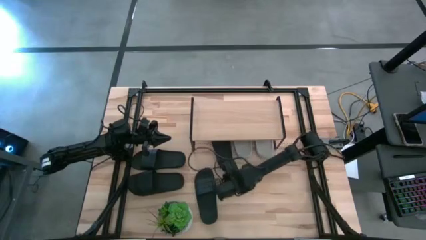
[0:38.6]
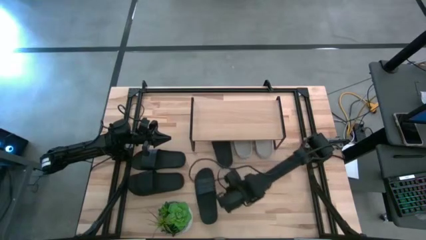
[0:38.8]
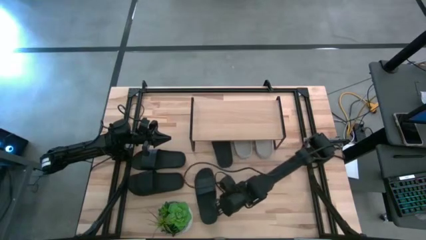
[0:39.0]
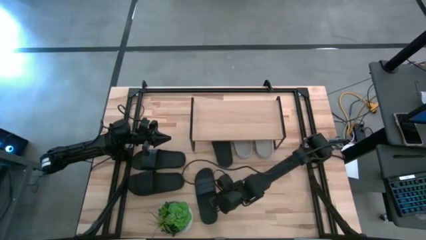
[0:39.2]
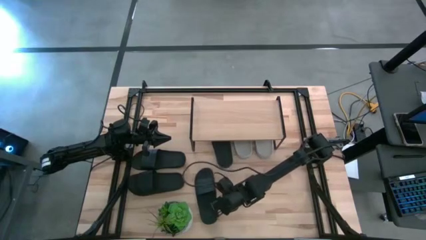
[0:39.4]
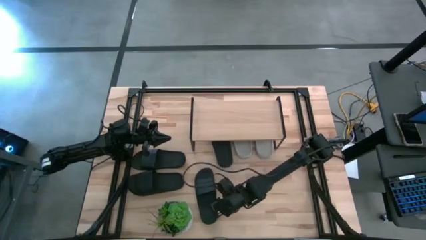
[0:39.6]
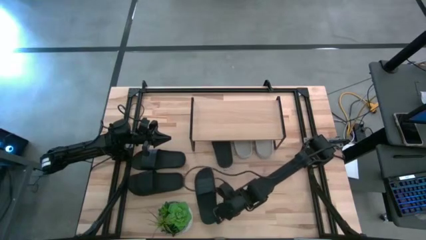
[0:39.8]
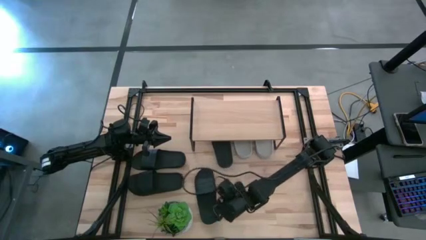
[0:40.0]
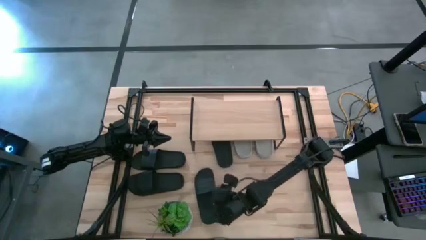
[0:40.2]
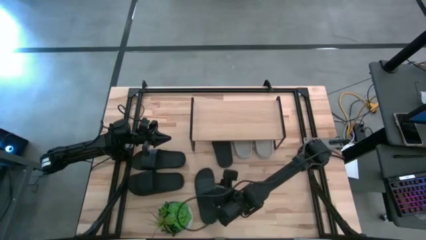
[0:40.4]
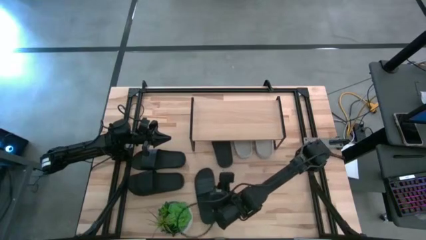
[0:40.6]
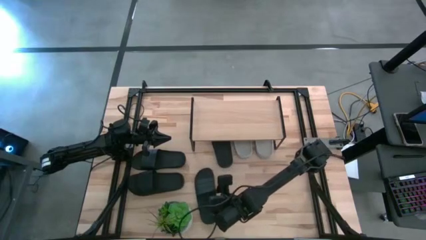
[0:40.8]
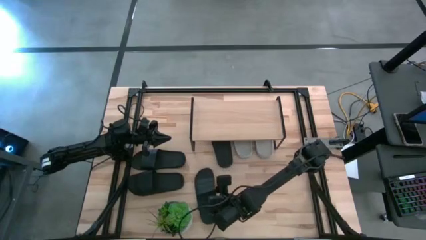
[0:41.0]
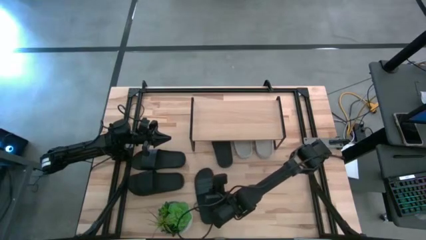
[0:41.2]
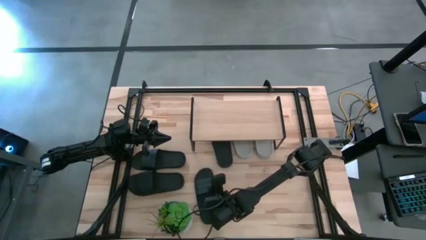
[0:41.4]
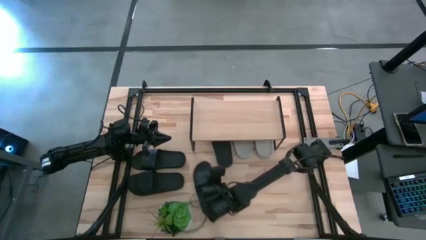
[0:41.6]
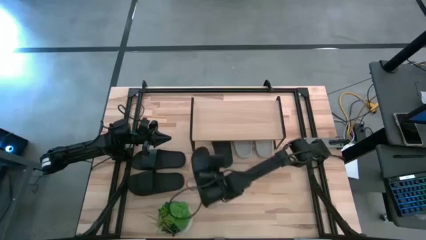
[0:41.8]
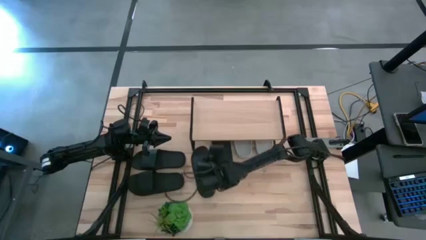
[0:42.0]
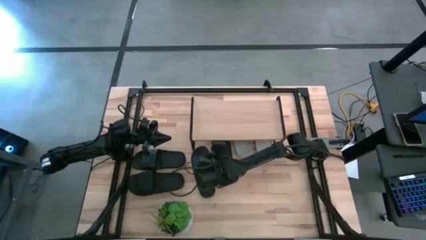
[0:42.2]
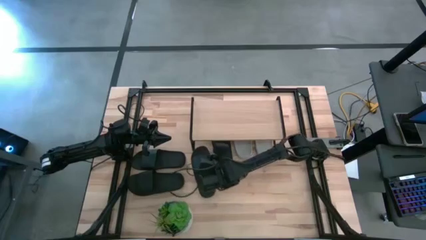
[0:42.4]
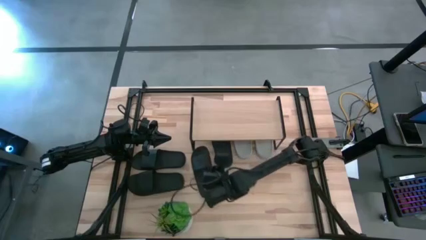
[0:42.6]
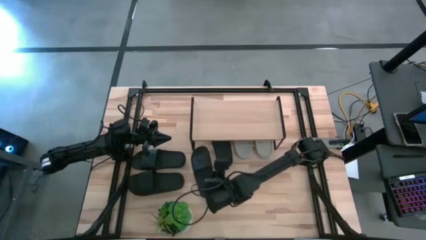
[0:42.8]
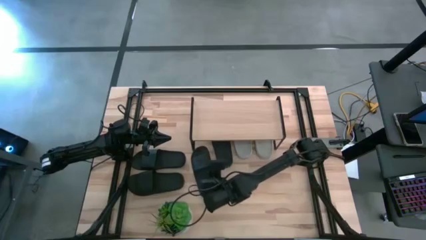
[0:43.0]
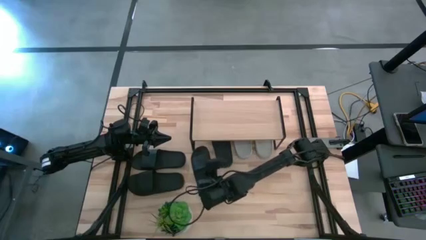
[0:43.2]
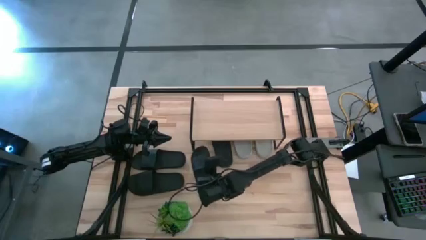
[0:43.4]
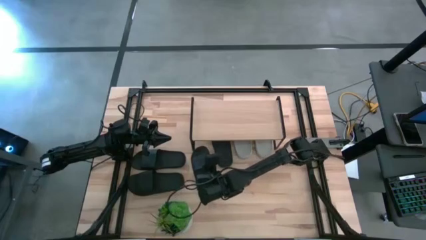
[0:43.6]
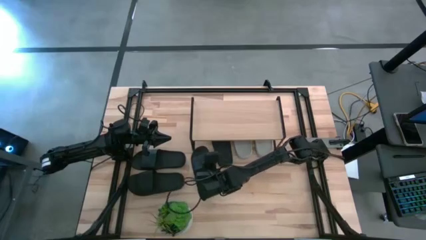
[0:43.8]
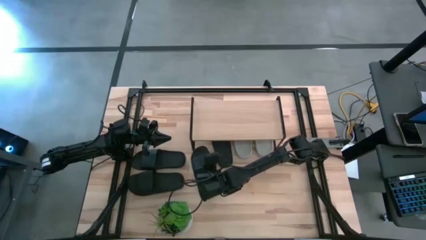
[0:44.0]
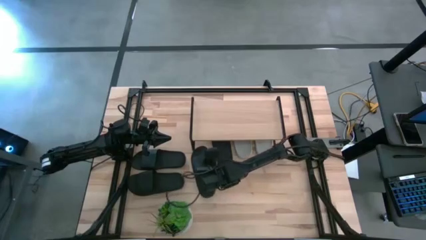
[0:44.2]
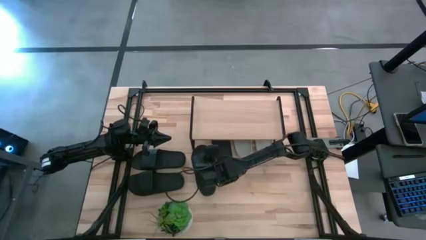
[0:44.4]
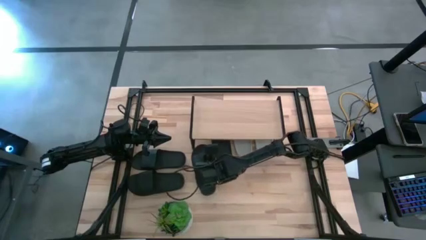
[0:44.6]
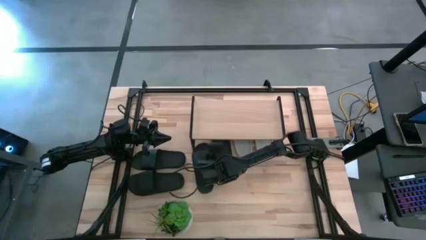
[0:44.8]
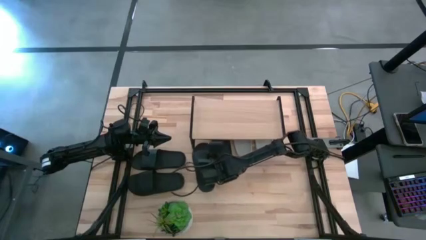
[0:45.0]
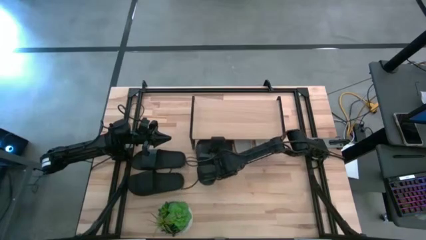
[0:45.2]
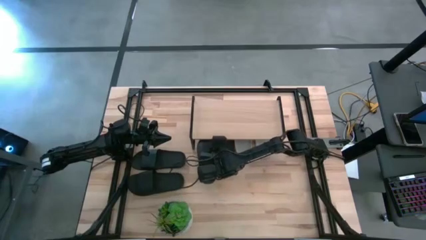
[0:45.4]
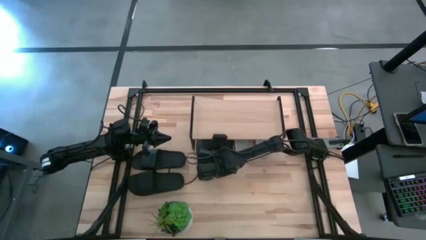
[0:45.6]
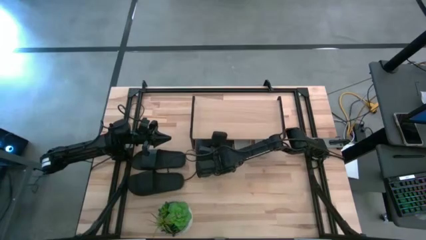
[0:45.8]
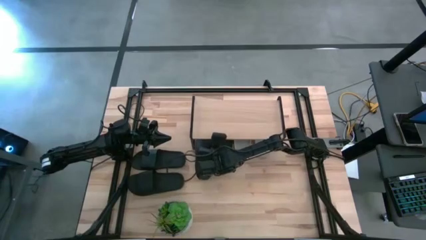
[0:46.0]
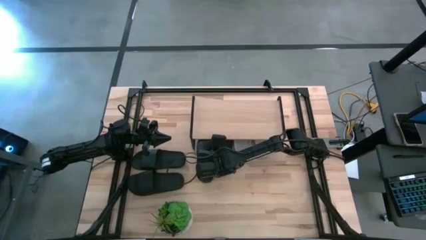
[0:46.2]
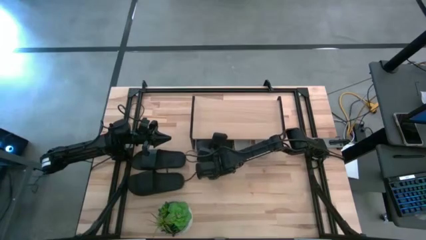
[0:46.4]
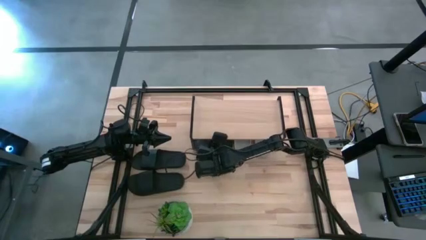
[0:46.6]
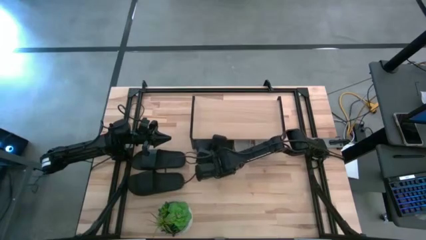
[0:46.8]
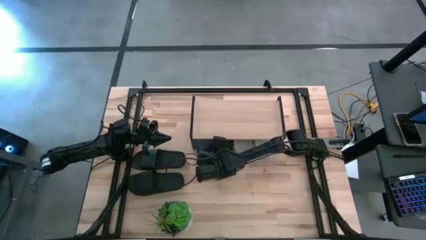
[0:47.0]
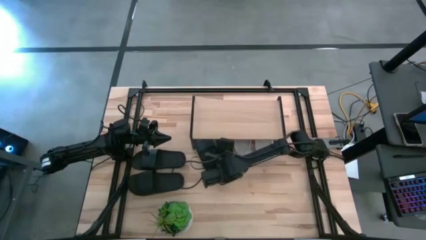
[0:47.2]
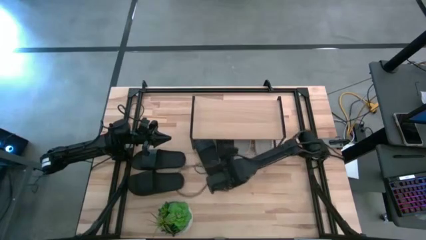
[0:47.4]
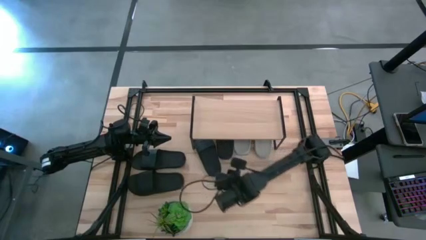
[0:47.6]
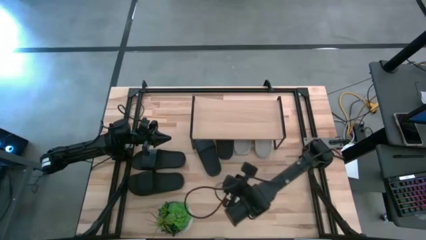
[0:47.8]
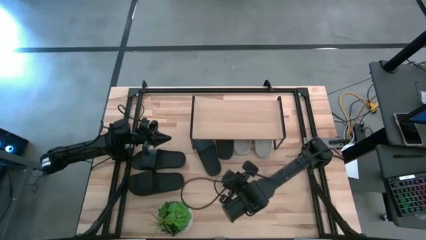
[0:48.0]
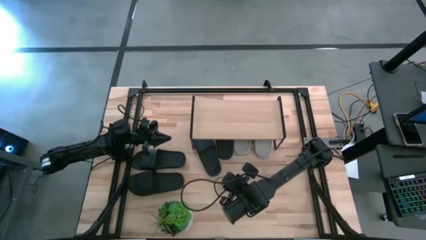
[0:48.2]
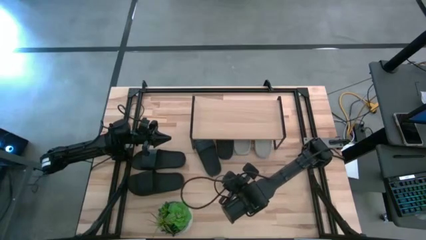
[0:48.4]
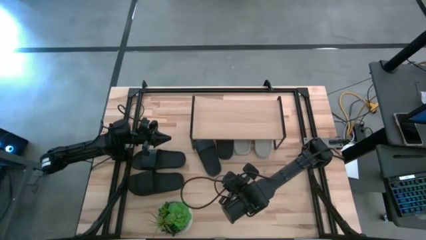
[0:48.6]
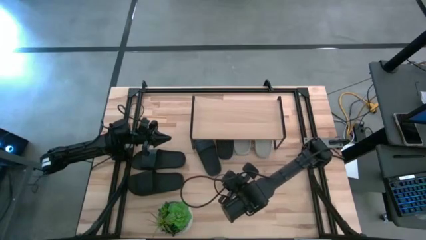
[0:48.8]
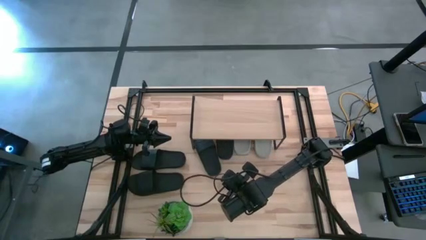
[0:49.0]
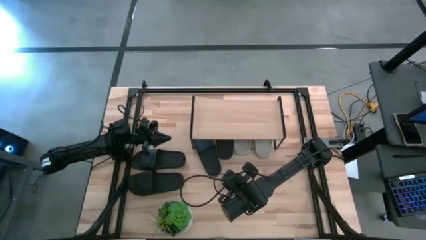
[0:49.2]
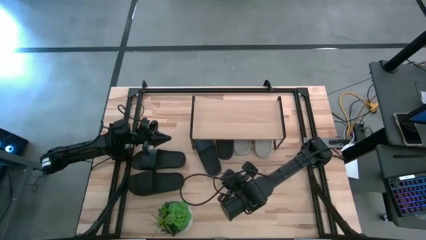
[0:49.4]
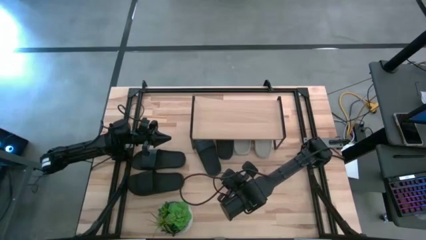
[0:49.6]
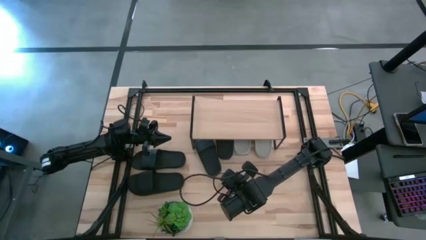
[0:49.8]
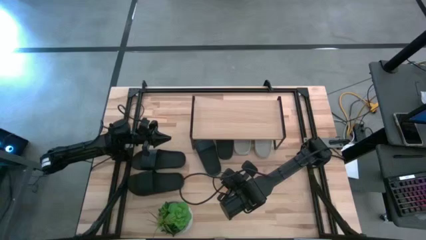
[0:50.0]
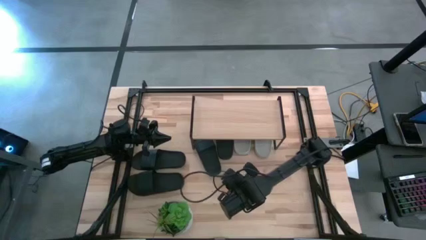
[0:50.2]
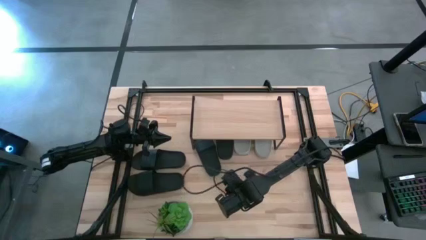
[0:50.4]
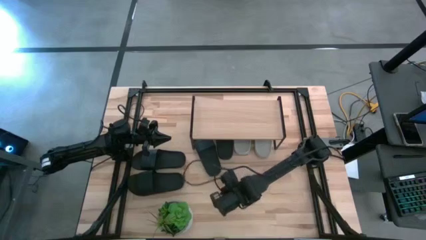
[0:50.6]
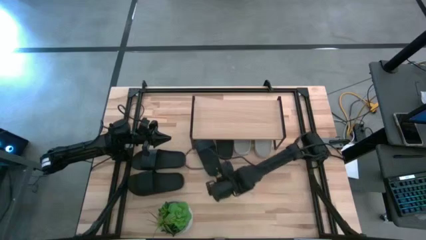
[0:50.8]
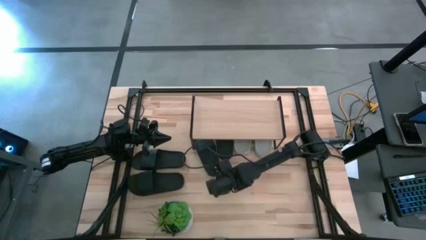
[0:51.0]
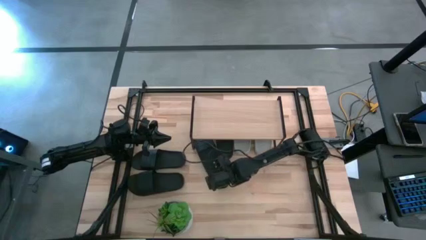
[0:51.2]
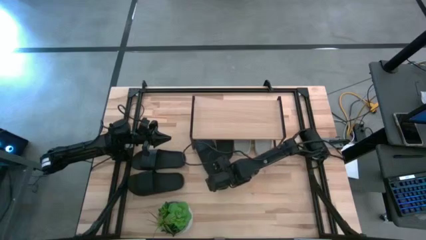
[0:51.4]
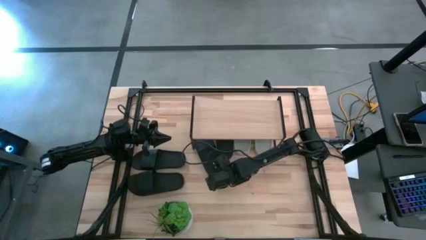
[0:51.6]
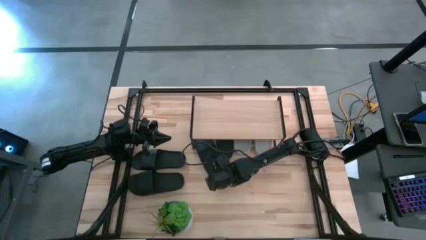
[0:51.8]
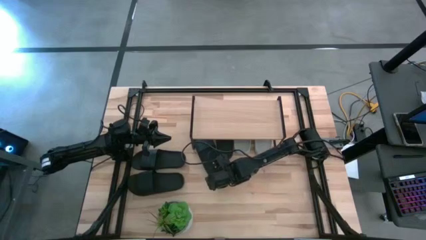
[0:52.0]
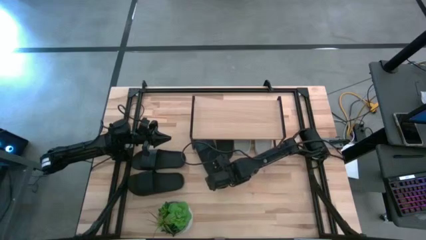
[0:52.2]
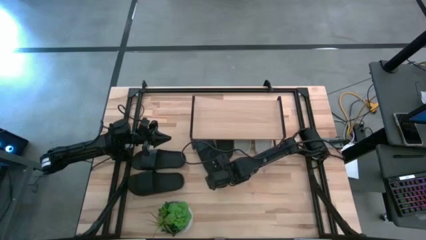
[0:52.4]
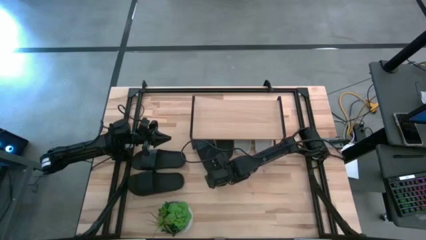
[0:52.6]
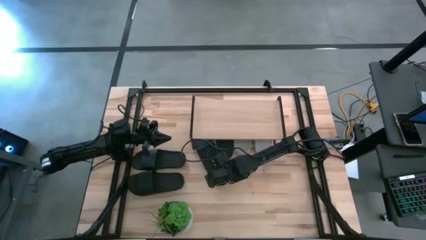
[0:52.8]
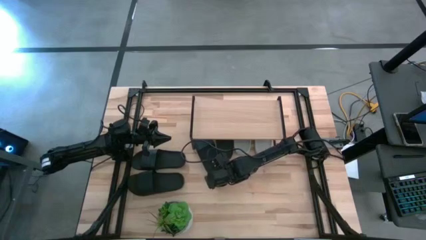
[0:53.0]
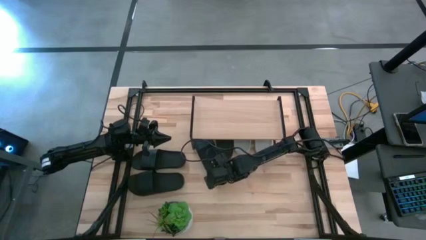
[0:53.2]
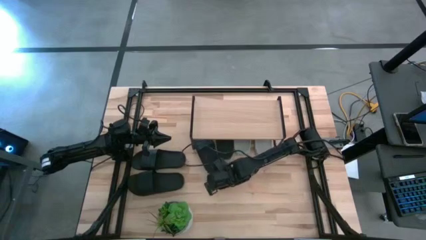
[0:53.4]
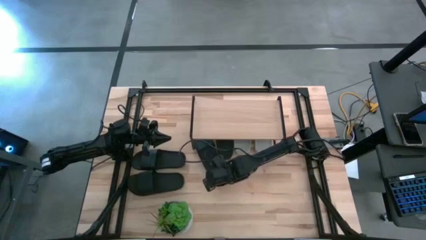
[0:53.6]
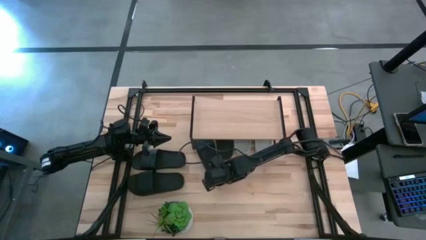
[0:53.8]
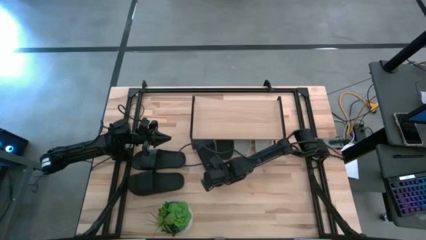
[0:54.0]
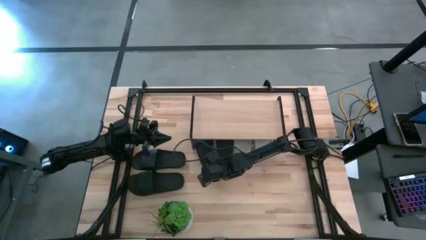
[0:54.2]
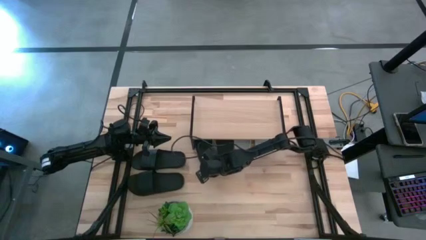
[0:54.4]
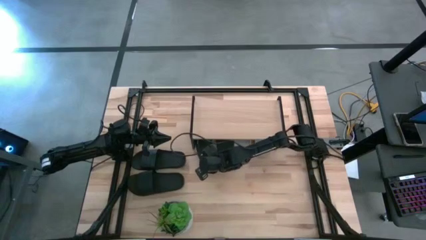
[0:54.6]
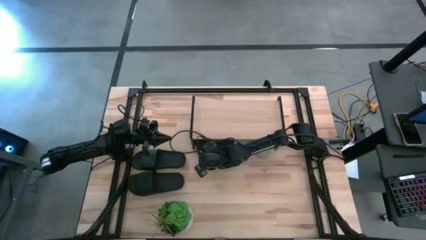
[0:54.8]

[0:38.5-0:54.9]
Task: Pick and place slides into the shelf
Put the black slipper under the shelf
